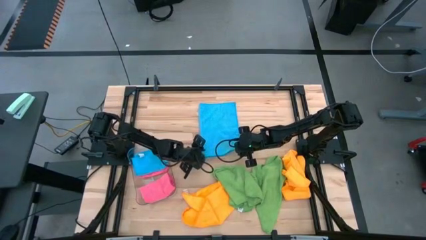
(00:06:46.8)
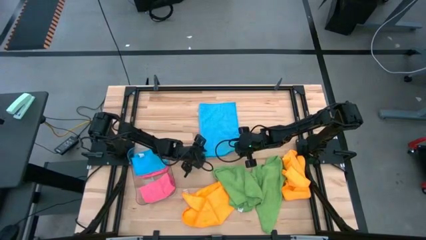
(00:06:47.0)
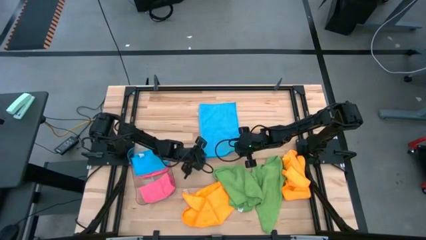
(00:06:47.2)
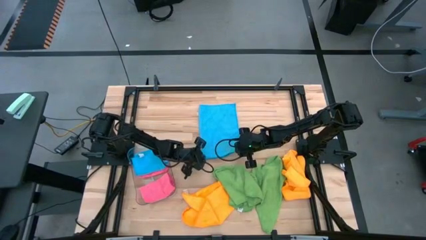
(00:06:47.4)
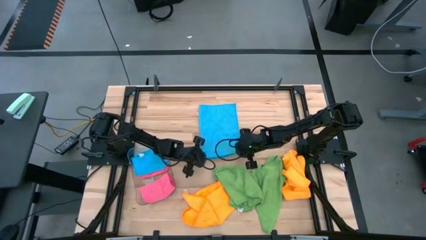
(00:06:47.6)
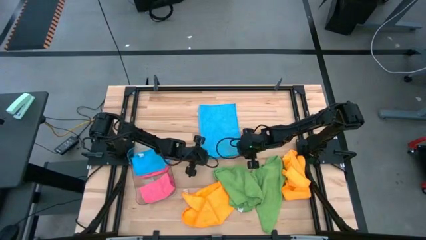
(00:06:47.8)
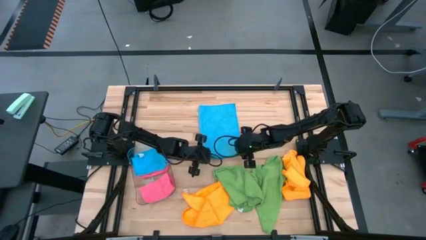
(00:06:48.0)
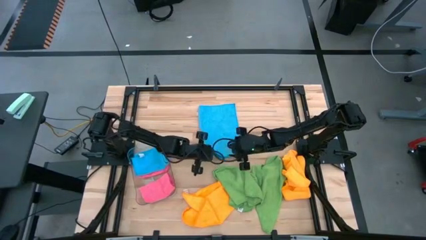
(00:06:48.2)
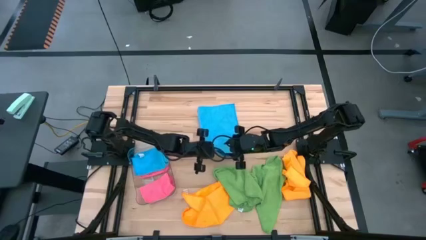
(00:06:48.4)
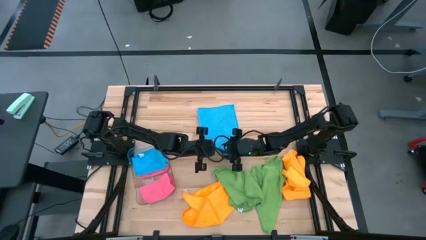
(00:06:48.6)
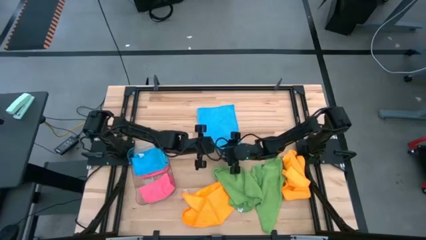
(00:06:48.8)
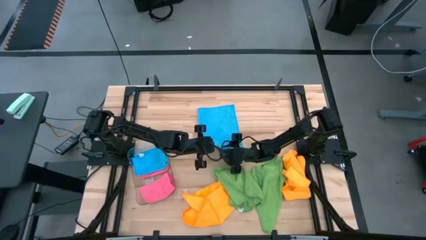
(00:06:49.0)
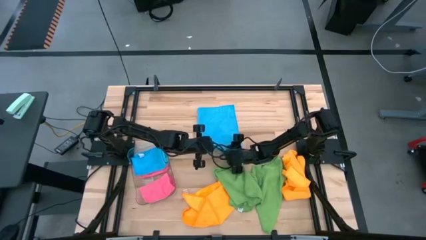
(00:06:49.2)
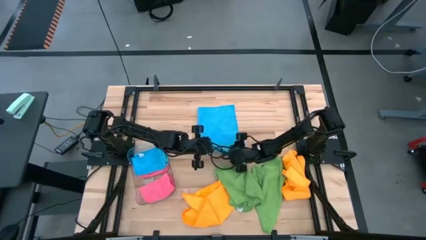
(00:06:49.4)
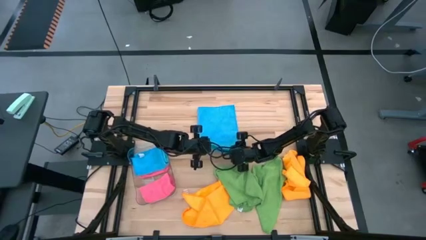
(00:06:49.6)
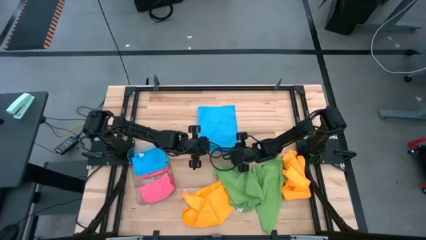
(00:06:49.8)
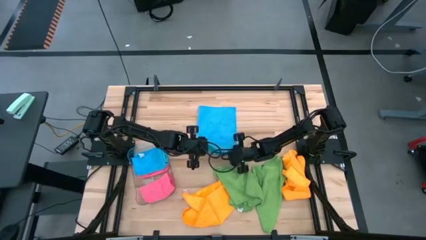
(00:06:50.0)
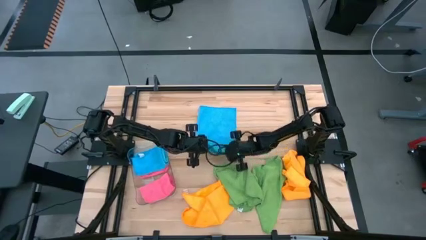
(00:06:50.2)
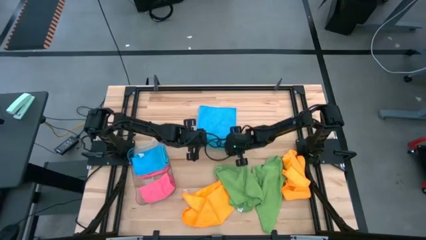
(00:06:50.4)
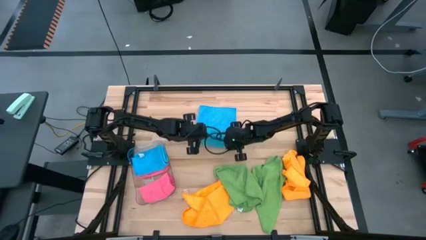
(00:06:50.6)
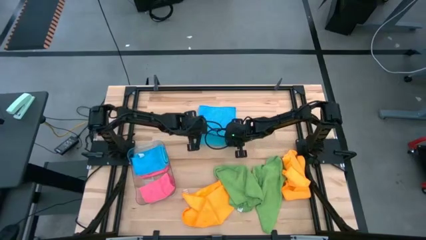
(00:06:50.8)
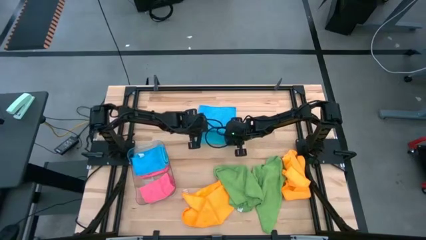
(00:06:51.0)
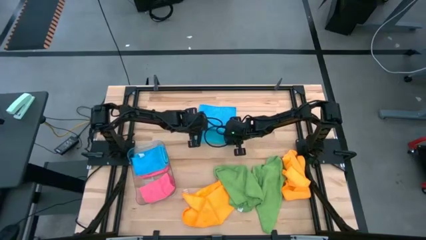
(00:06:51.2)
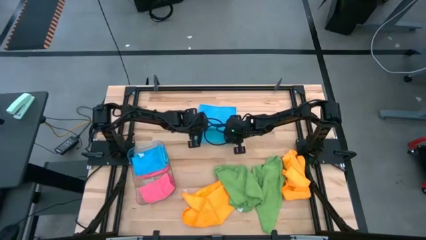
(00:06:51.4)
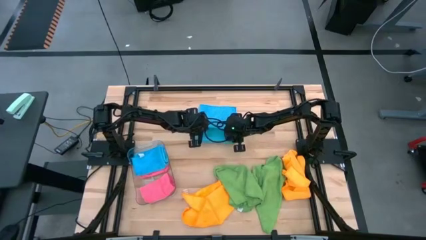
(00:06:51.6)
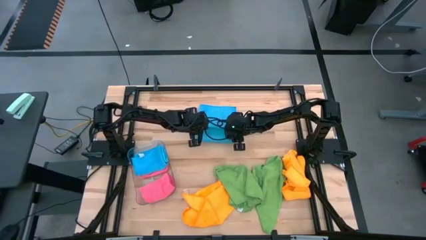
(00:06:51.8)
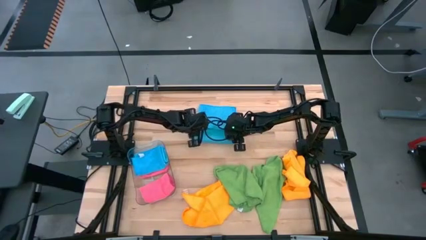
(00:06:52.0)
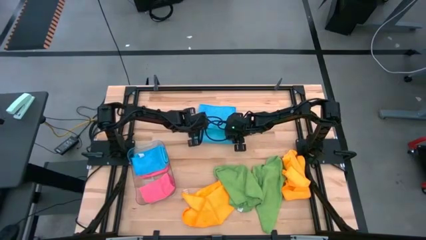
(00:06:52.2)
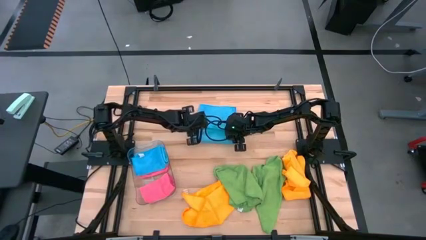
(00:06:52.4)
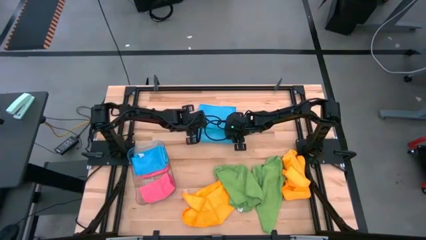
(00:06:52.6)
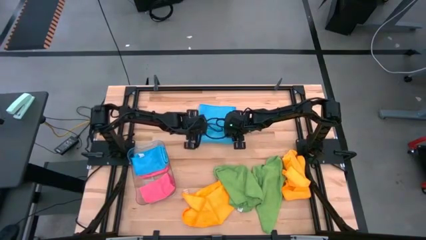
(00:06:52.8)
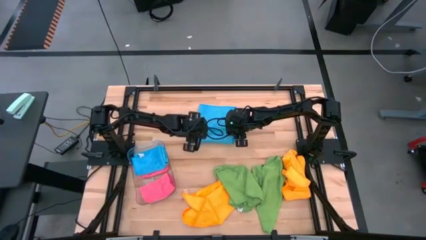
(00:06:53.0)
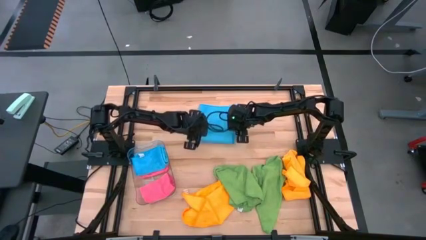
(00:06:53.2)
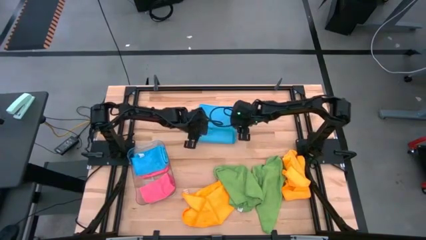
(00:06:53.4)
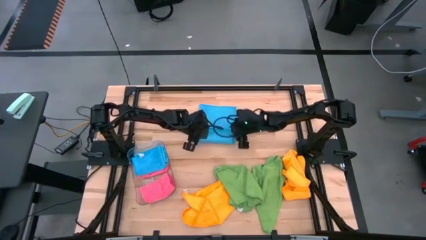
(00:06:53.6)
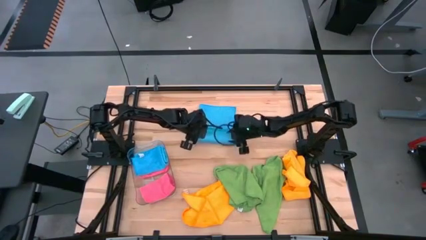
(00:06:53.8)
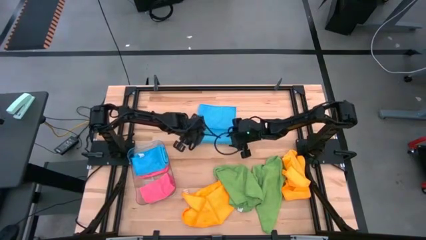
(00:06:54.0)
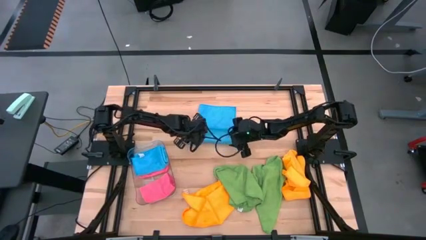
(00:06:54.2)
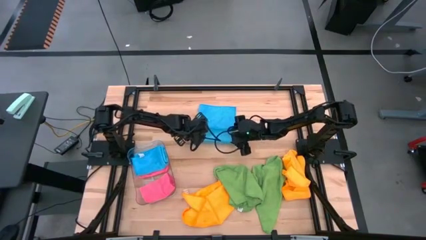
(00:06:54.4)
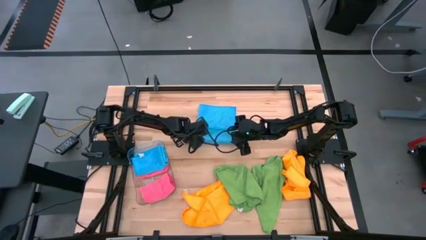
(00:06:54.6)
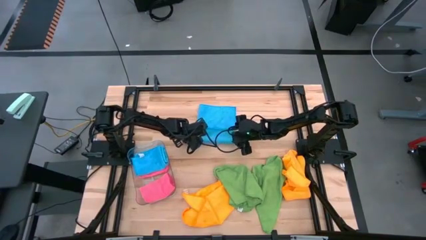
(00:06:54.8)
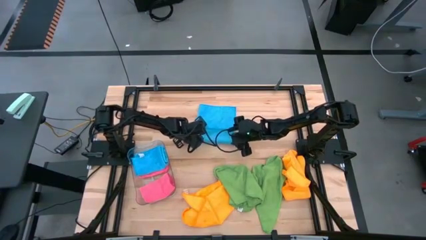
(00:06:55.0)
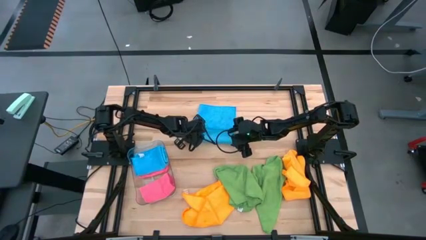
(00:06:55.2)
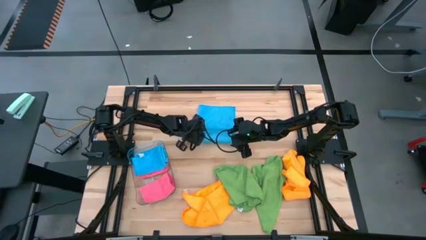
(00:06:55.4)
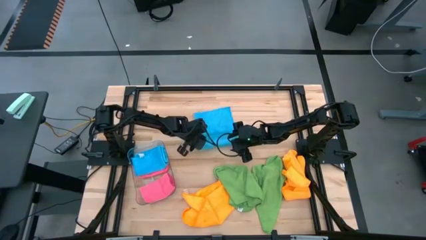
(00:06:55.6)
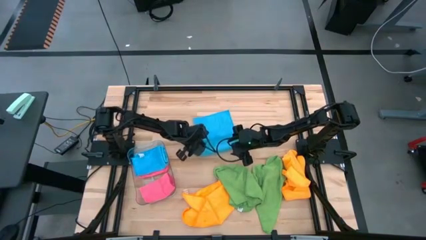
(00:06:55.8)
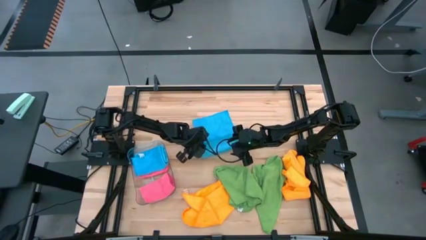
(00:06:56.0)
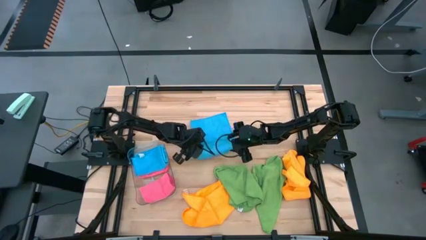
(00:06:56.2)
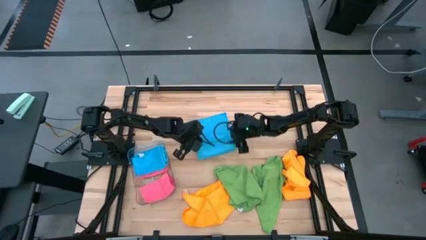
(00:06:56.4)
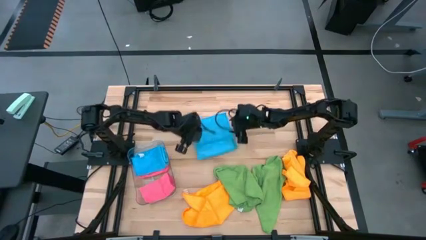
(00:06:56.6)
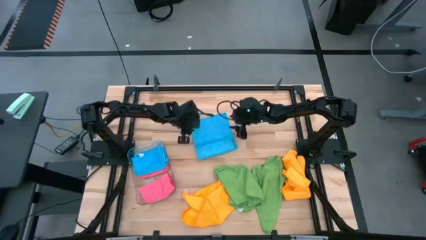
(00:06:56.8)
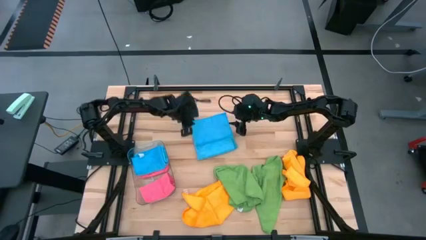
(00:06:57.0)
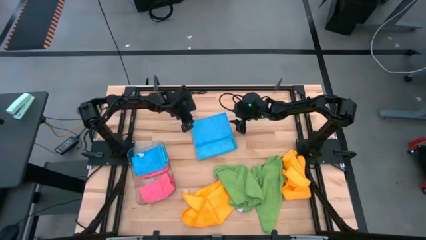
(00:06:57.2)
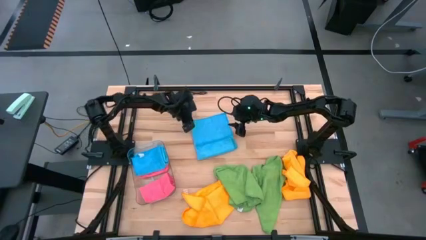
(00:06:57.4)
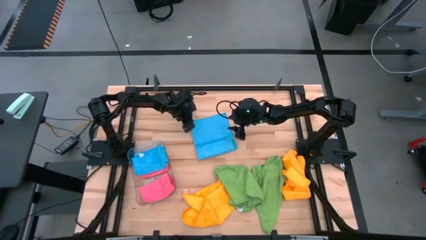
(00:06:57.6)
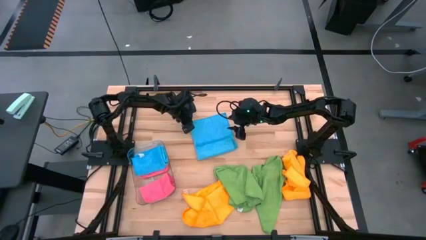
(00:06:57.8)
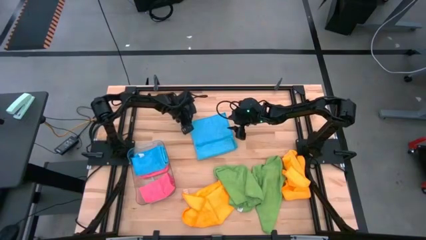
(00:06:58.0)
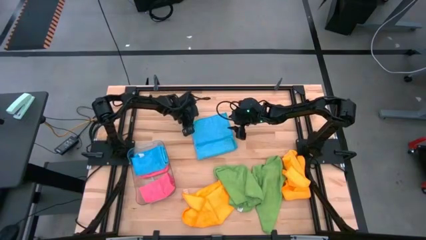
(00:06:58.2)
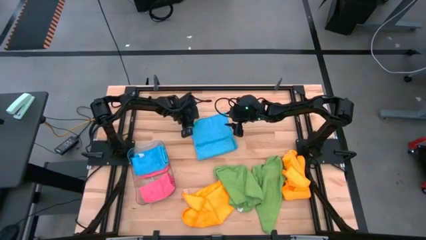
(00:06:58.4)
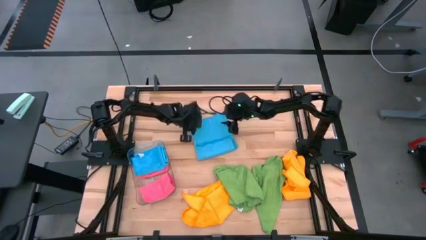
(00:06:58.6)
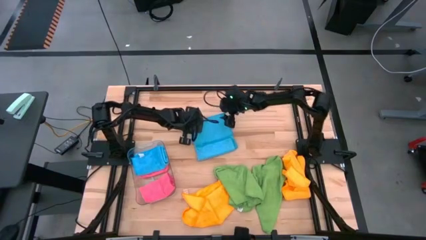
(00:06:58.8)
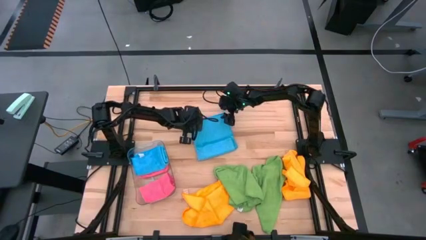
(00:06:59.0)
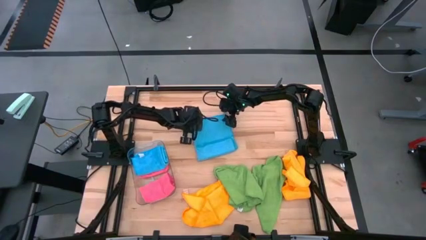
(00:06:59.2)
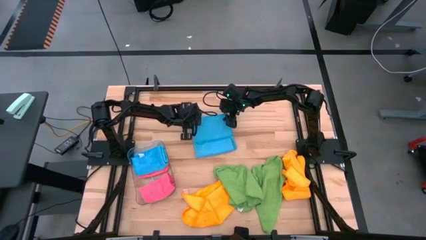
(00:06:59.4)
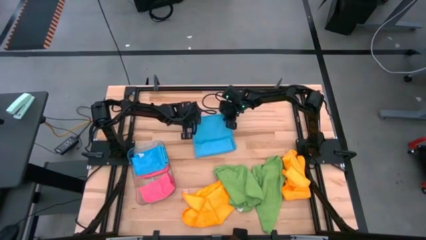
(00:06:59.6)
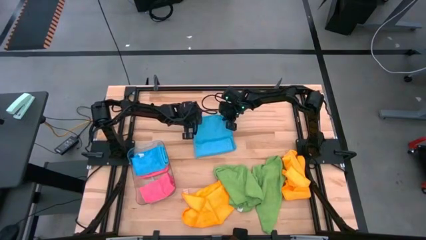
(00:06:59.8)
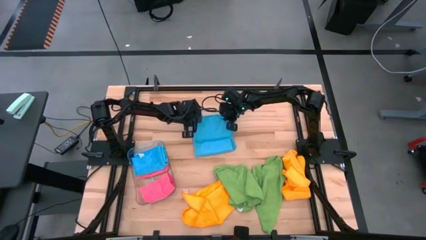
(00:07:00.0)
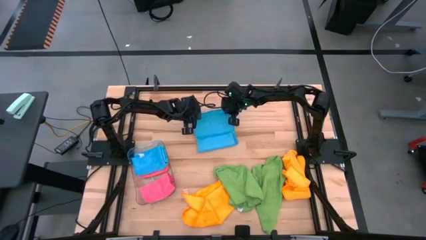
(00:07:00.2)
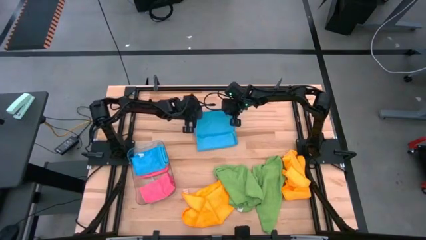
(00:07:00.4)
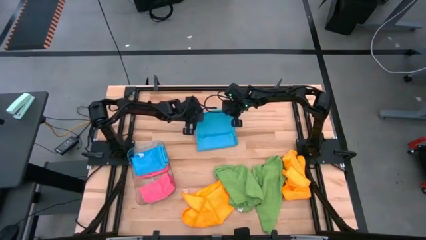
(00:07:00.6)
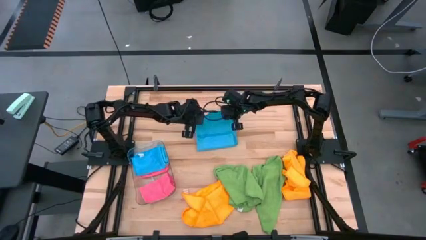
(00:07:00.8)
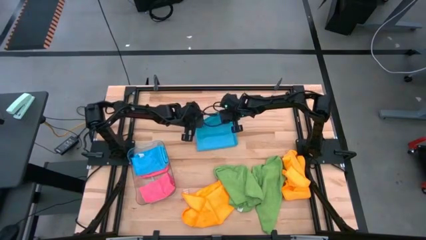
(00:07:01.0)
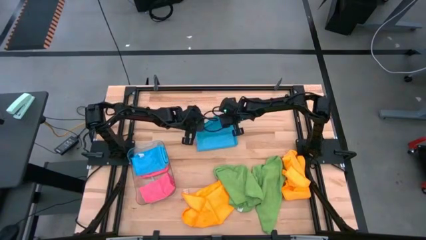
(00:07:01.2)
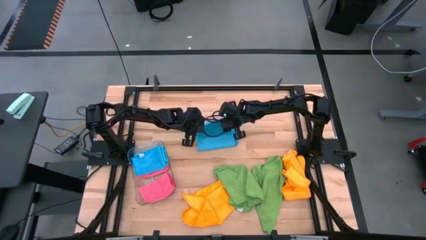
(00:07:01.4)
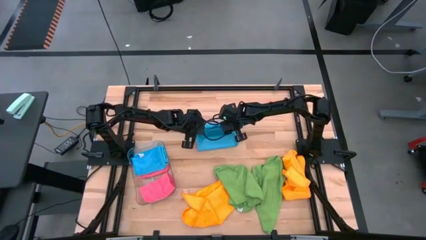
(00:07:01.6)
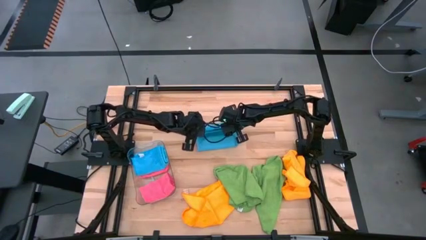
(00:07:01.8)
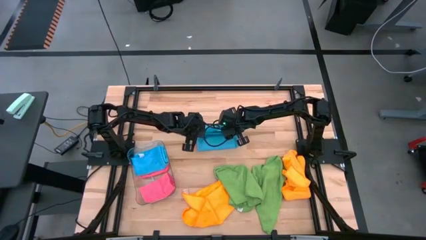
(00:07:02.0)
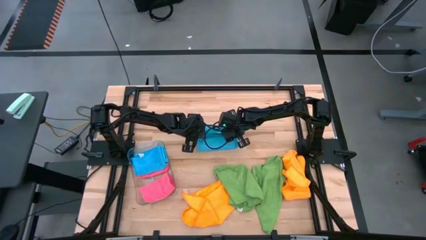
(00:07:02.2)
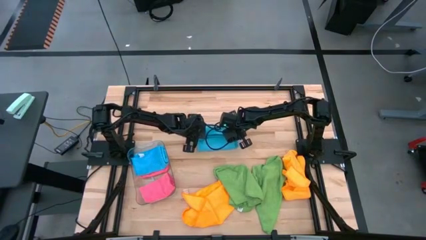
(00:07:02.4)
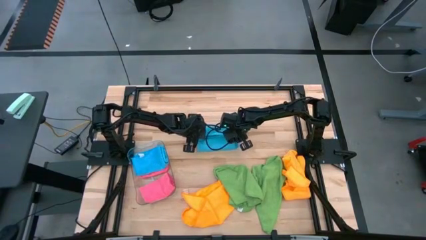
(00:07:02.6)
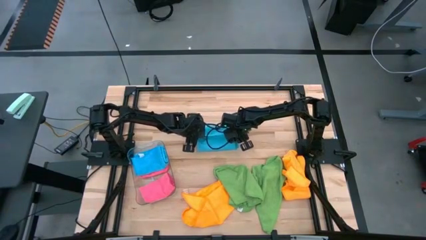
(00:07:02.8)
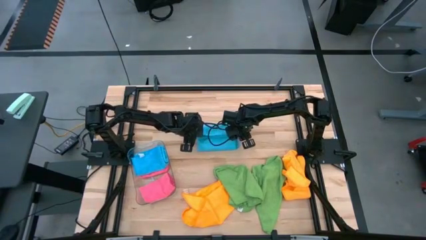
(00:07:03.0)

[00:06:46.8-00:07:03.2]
Task: Fold microfiber towels
Fold the blue microfiber cloth
